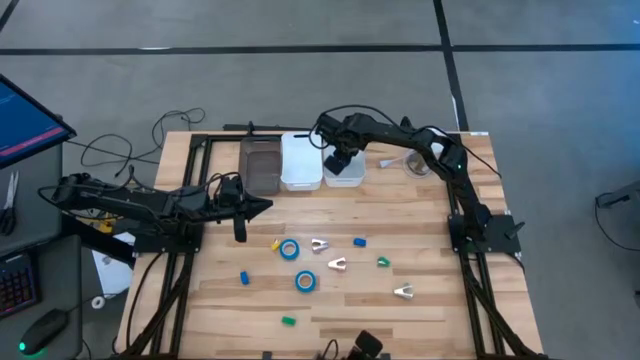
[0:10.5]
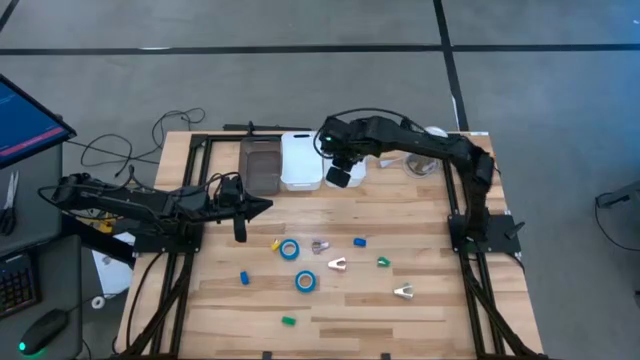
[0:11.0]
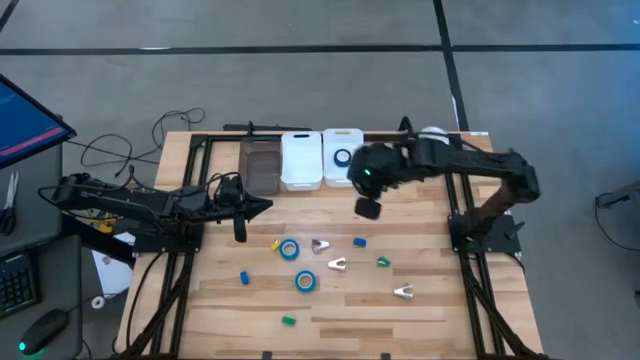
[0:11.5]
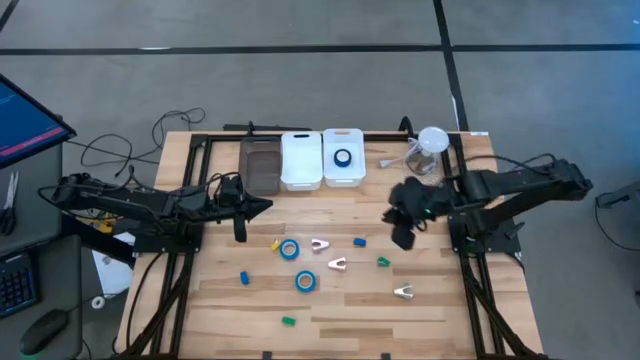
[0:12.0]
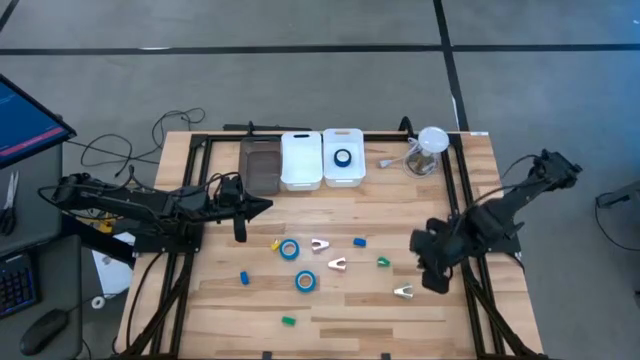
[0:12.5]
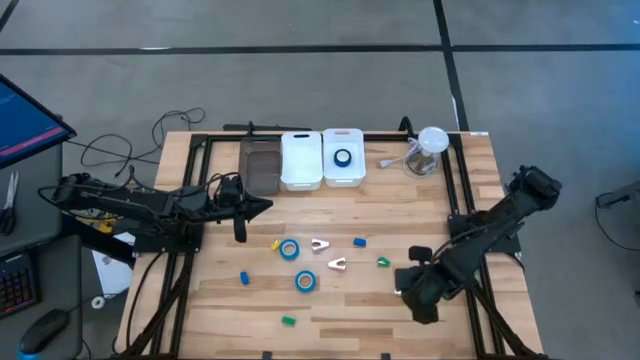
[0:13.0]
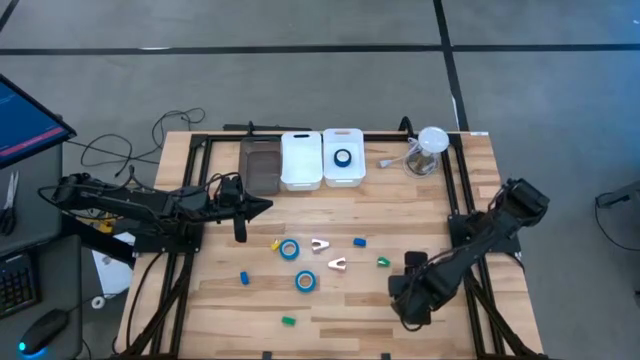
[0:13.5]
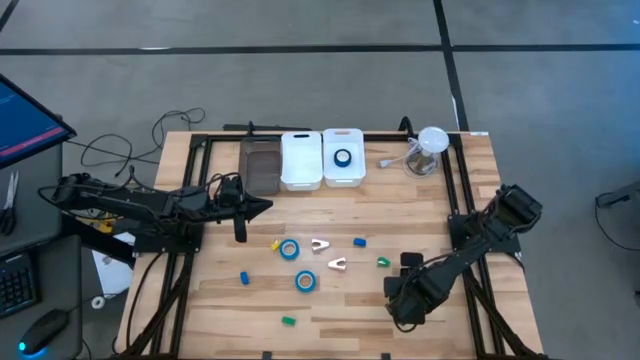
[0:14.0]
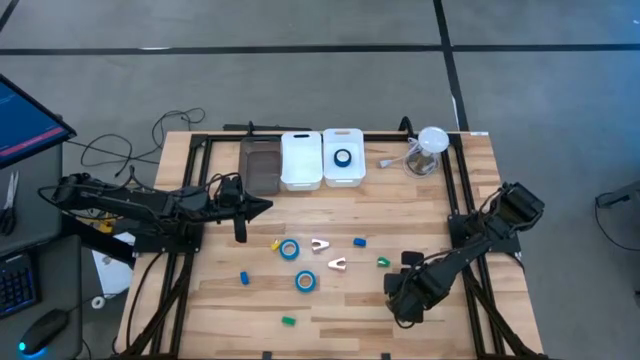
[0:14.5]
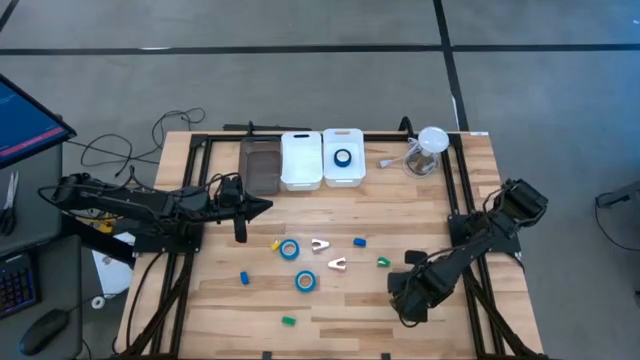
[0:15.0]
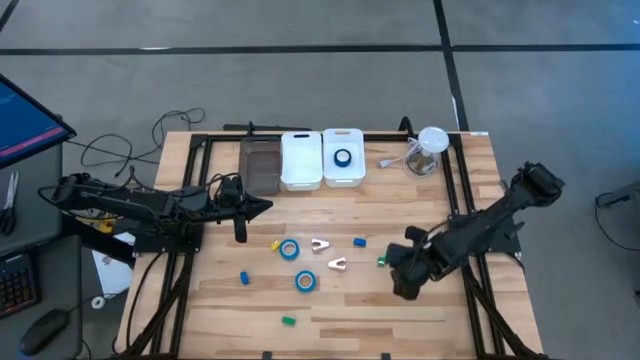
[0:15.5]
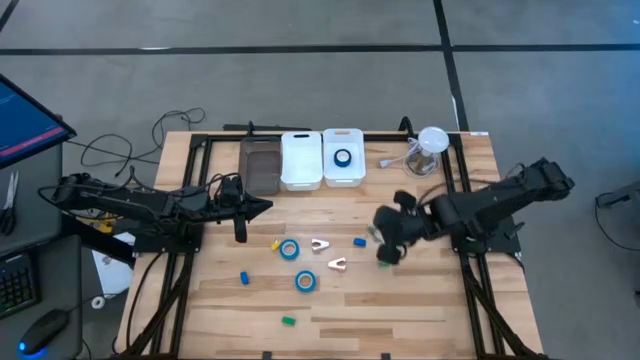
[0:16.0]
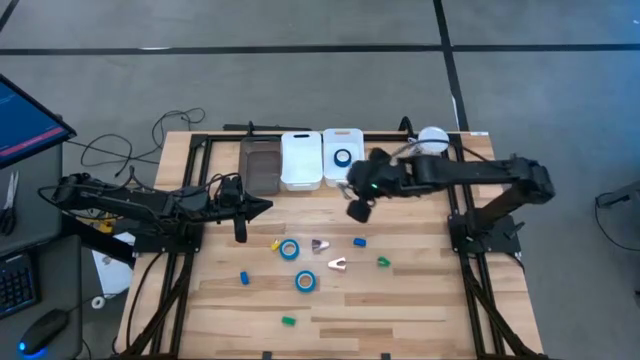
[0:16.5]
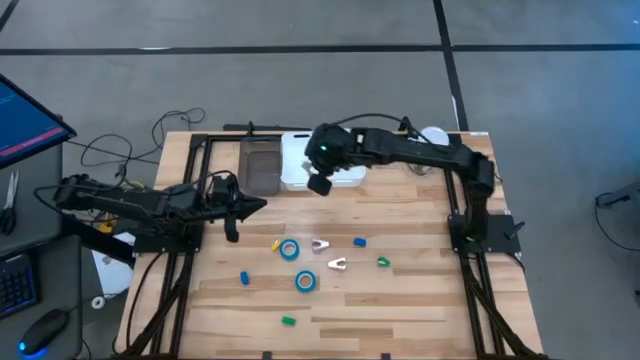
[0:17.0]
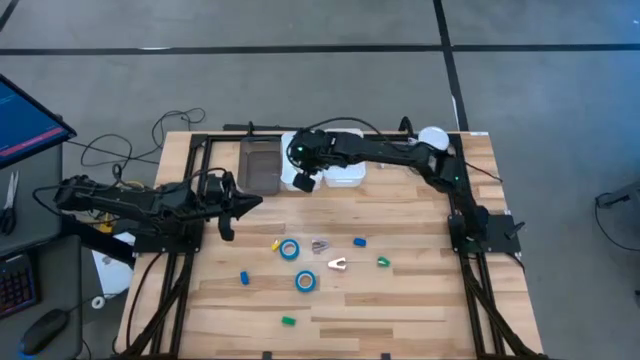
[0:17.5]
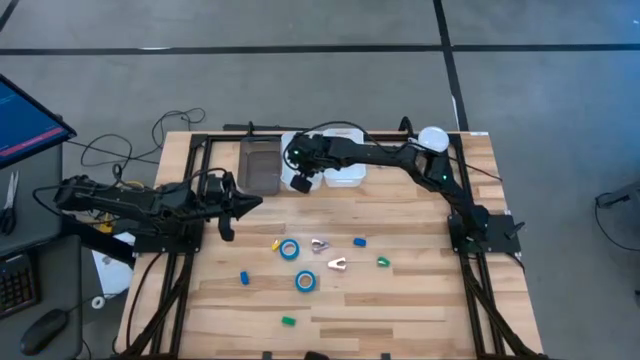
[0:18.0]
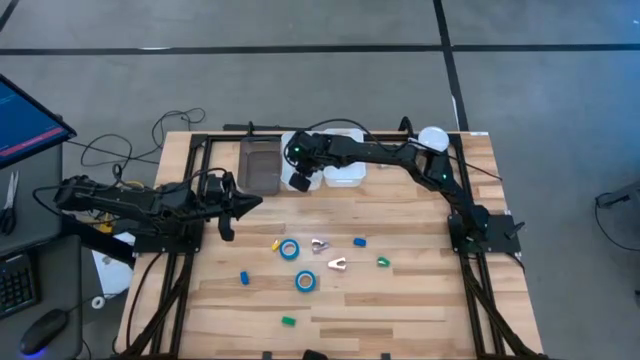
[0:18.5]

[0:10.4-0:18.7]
Task: Pick and place Stapler, Stapler remover, tape
Put the gray staple remover into the left white bin

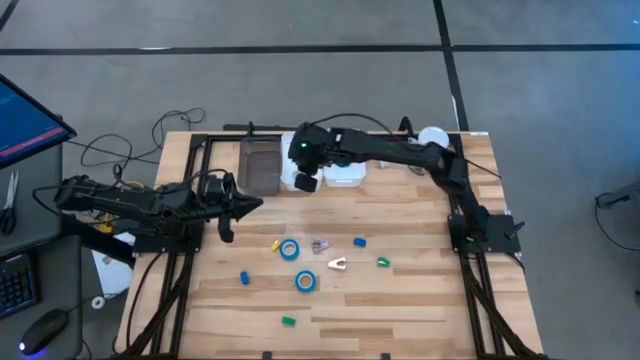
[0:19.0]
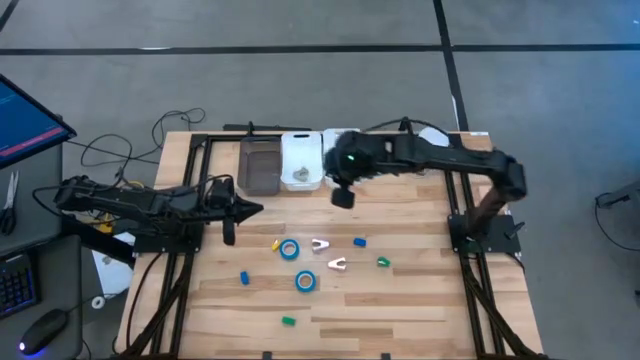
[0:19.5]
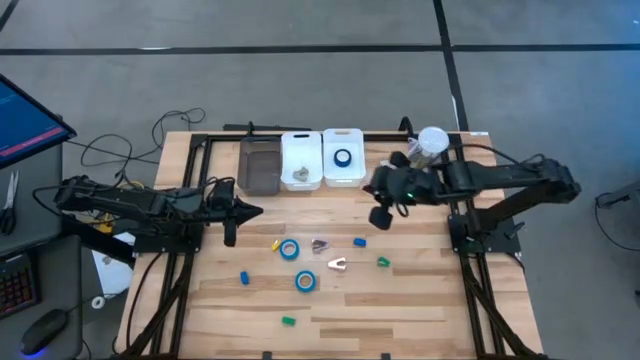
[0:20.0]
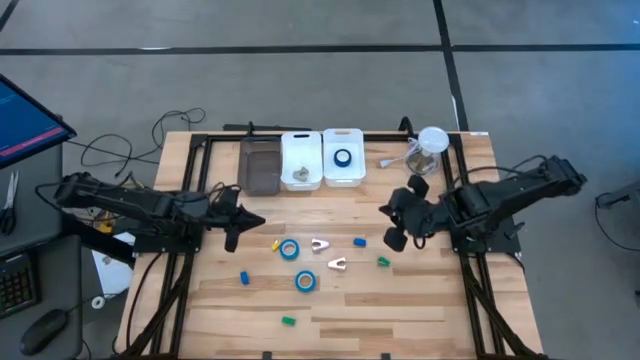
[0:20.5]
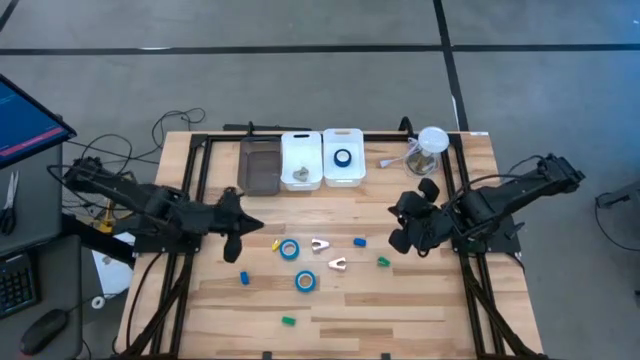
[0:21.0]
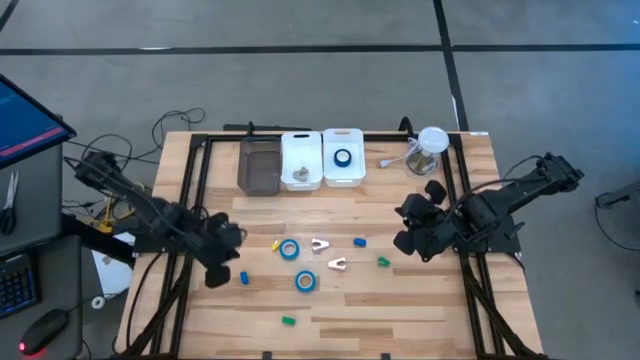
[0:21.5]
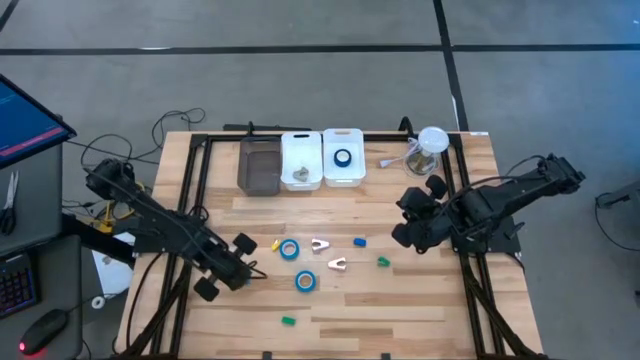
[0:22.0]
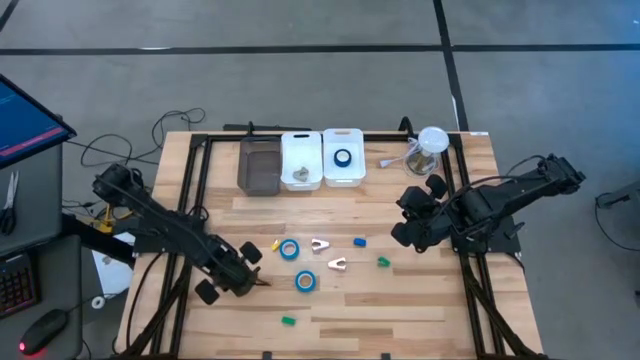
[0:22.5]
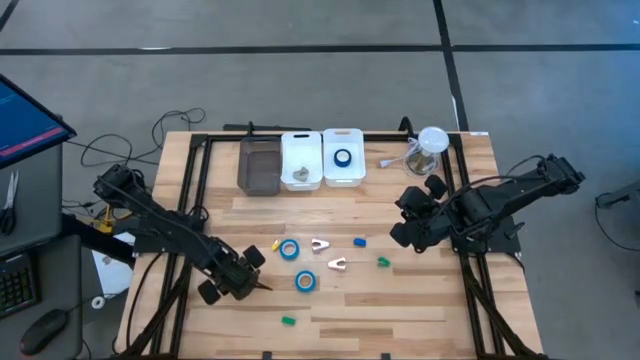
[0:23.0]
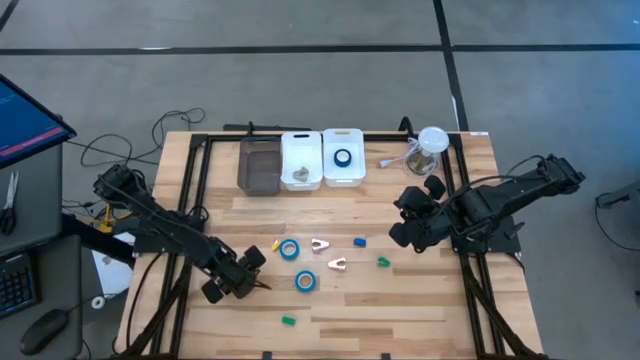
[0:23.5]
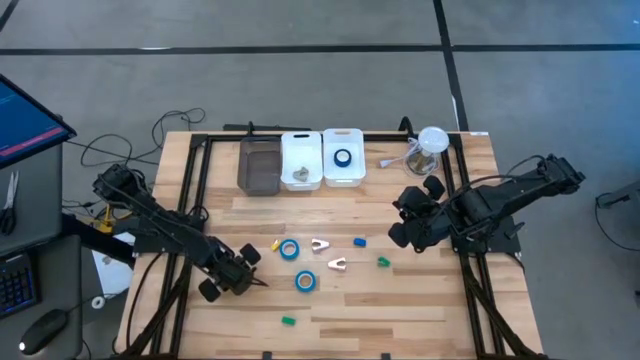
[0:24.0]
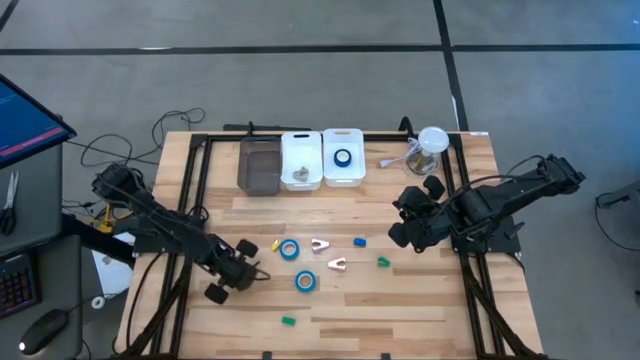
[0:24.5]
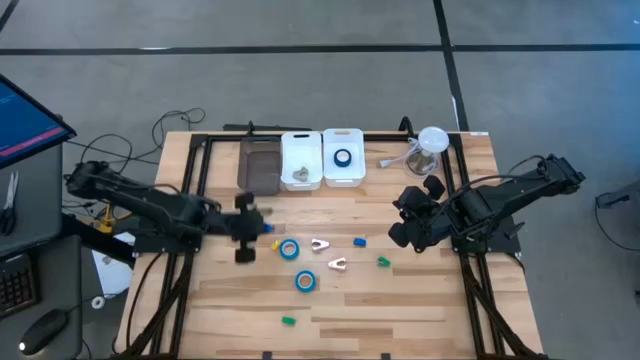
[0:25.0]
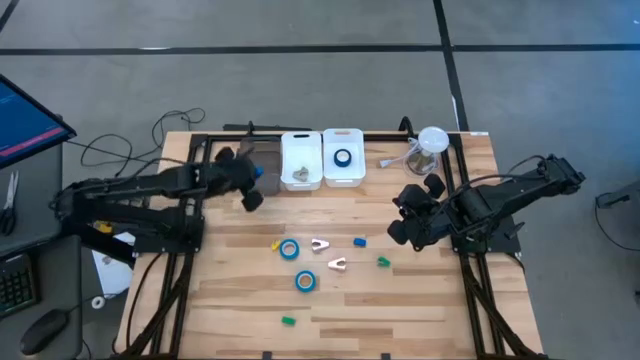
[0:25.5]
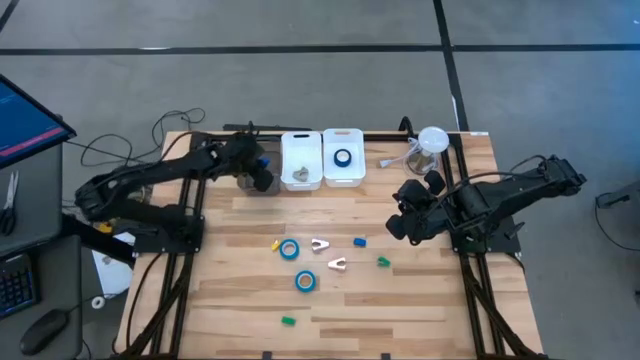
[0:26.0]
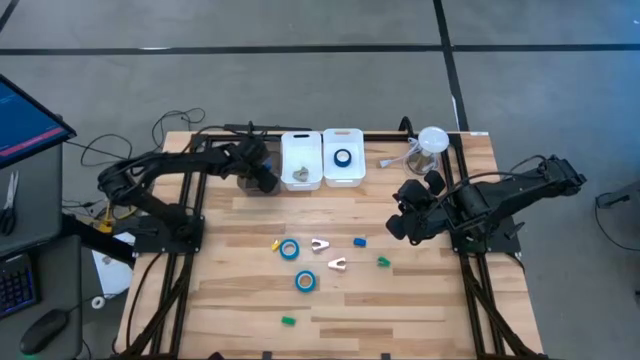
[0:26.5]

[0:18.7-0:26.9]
Put the left blue stapler into the black bin

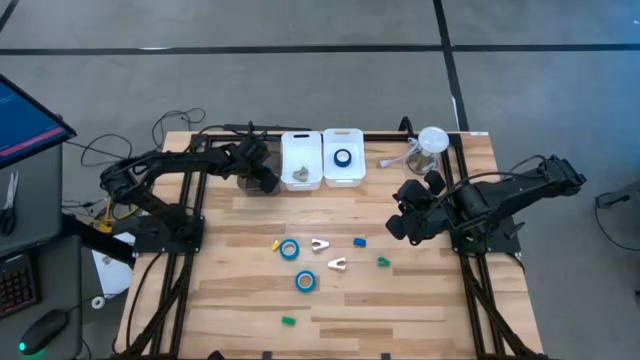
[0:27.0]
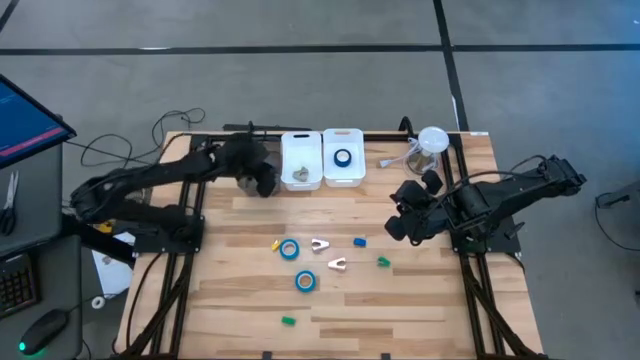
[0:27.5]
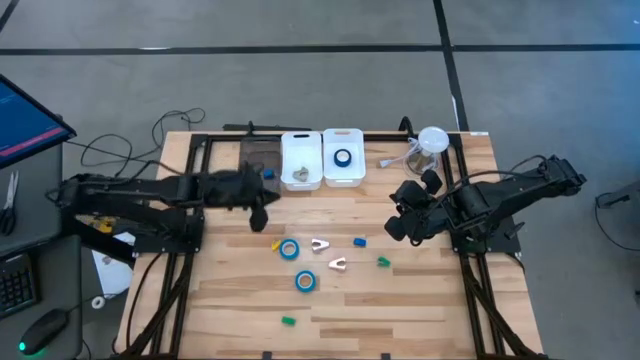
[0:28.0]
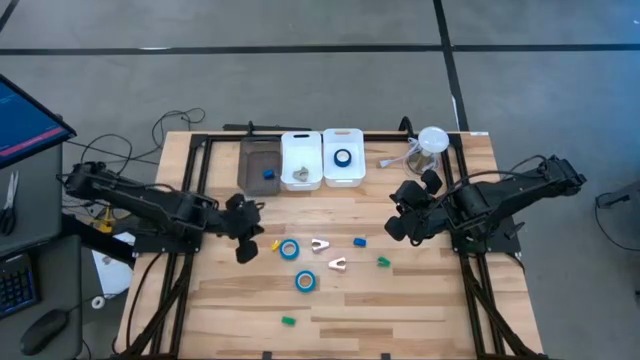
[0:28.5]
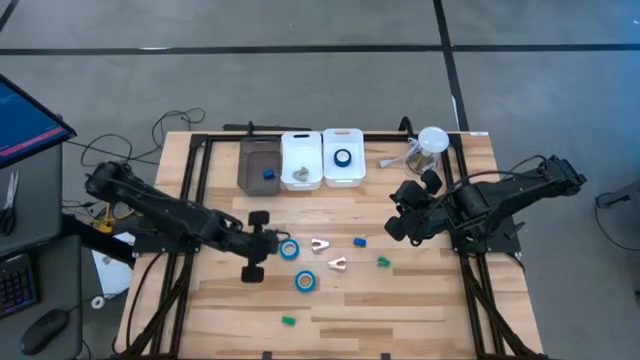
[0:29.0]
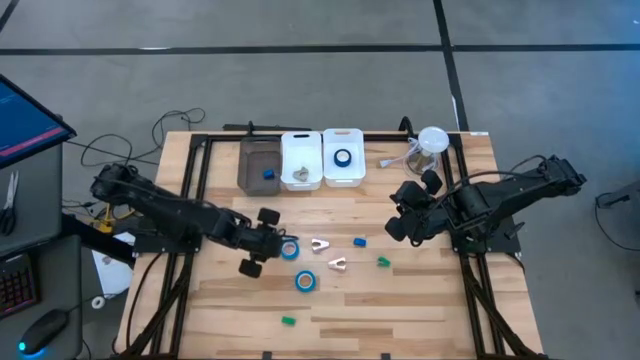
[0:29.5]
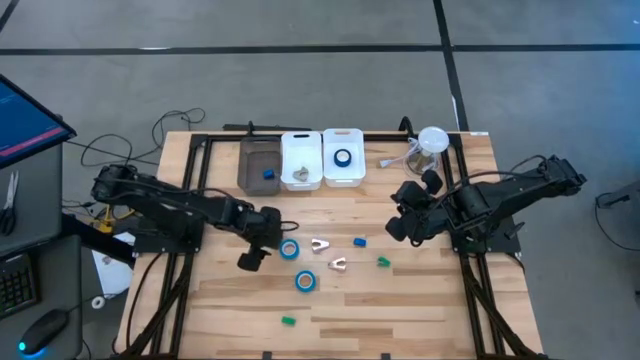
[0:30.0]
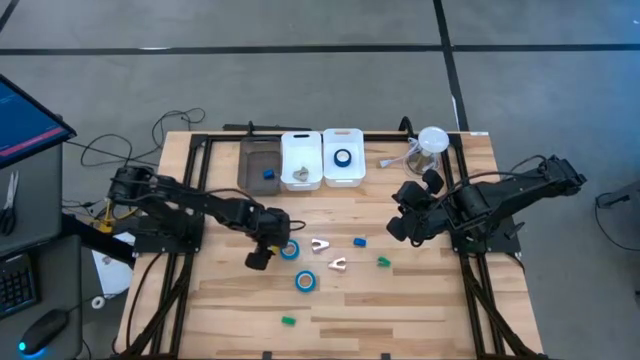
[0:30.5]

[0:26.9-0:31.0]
Put the yellow stapler into the black bin
